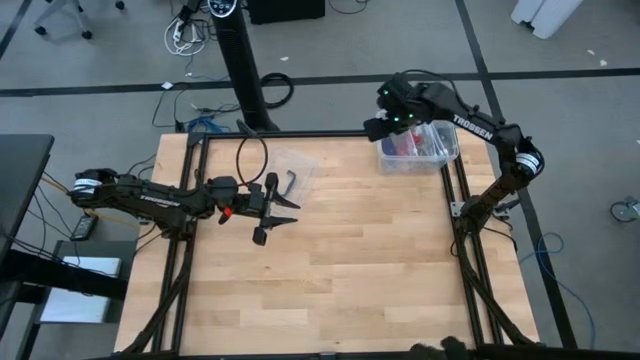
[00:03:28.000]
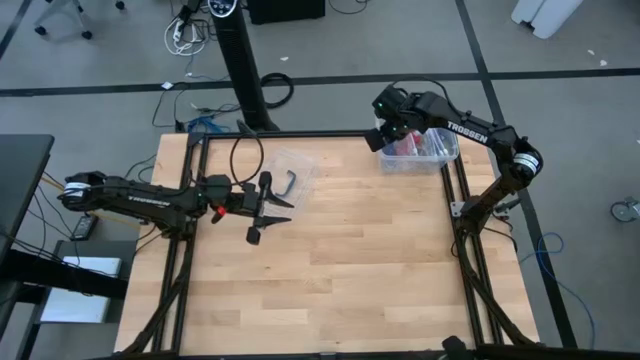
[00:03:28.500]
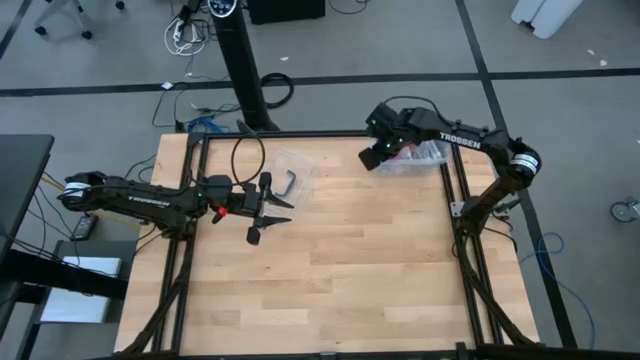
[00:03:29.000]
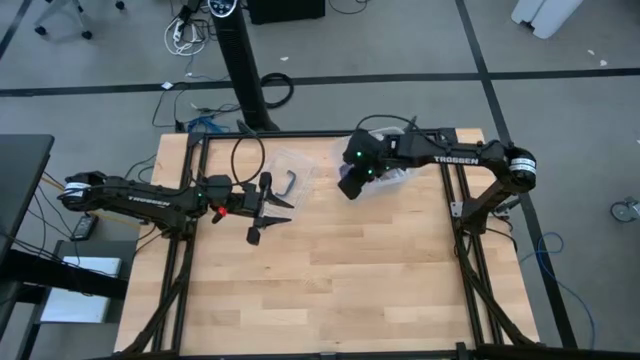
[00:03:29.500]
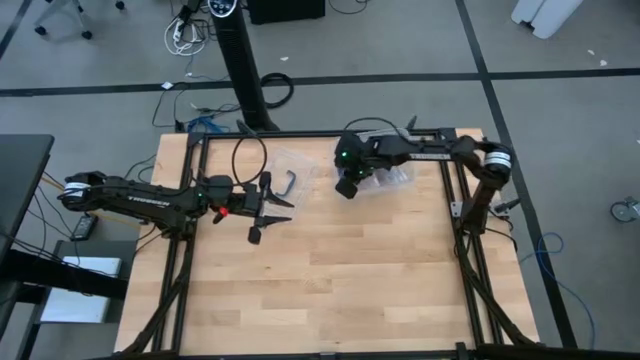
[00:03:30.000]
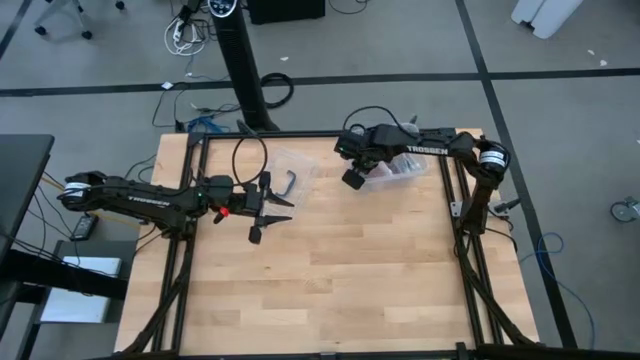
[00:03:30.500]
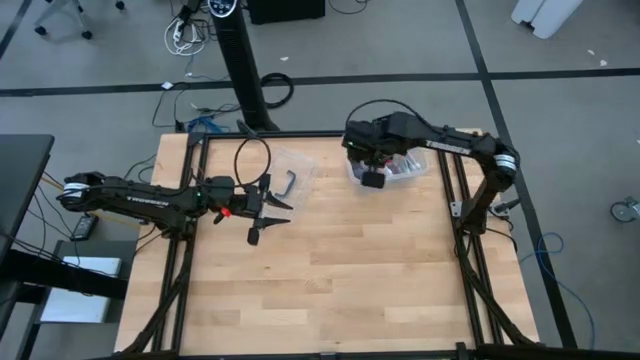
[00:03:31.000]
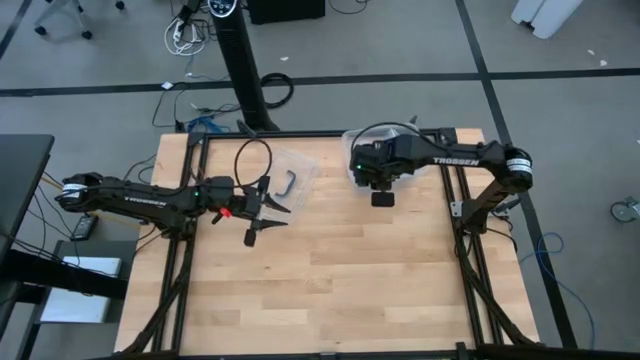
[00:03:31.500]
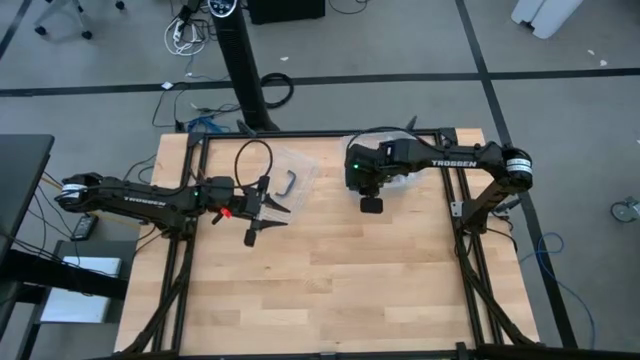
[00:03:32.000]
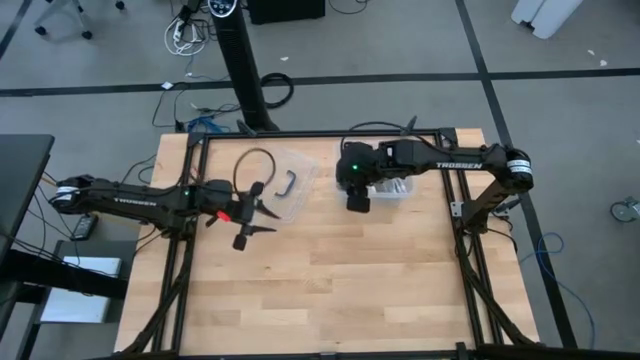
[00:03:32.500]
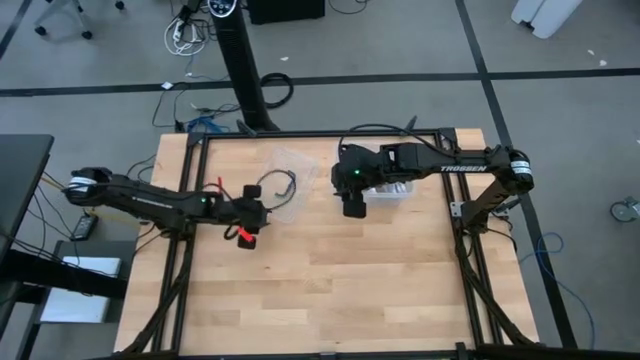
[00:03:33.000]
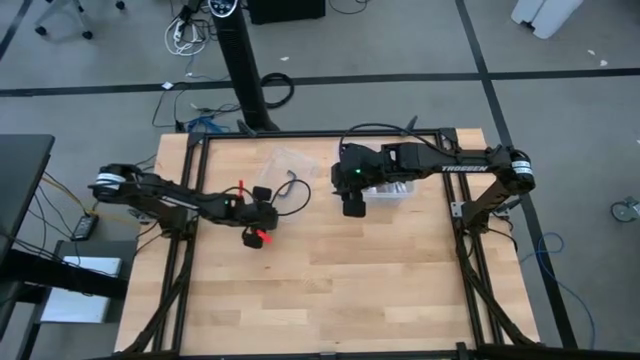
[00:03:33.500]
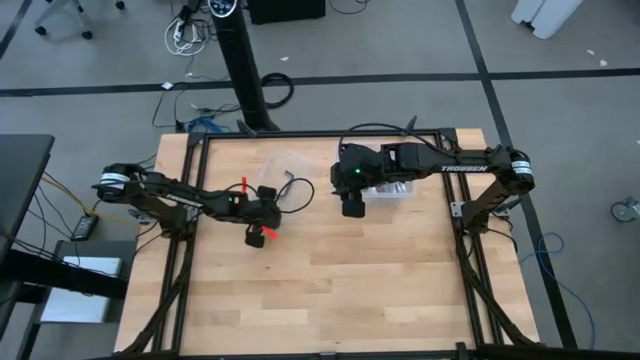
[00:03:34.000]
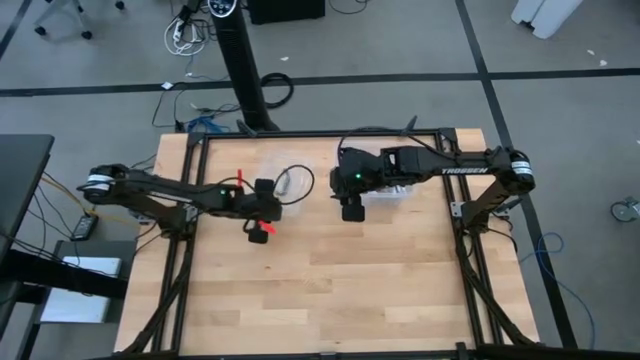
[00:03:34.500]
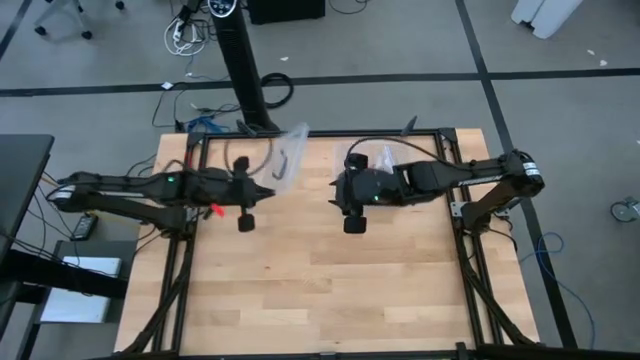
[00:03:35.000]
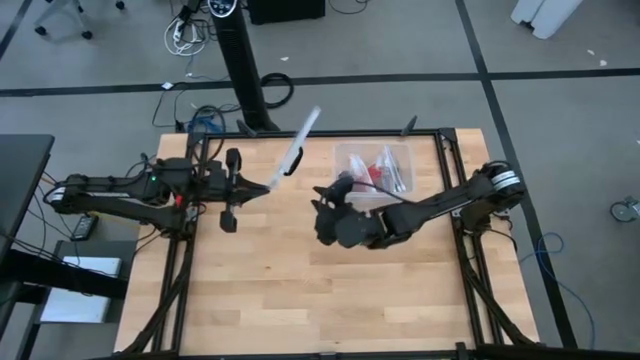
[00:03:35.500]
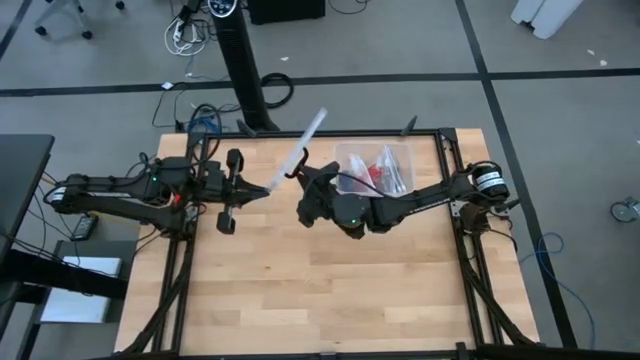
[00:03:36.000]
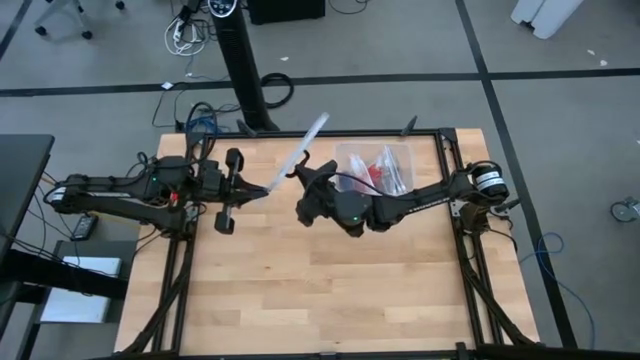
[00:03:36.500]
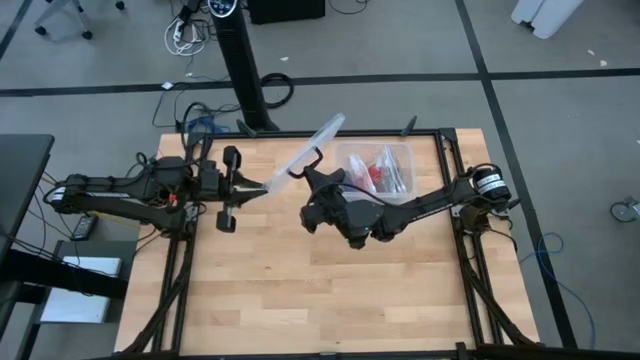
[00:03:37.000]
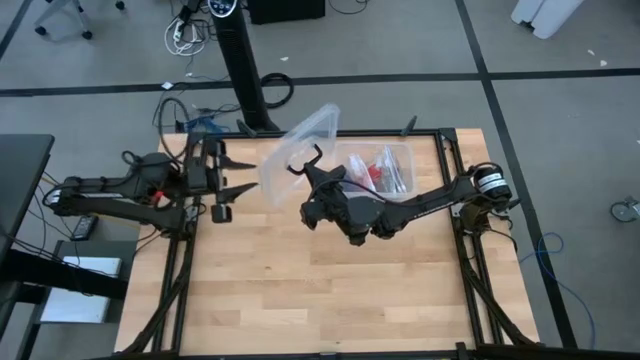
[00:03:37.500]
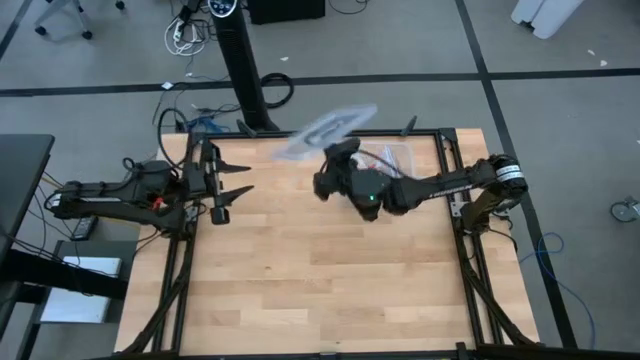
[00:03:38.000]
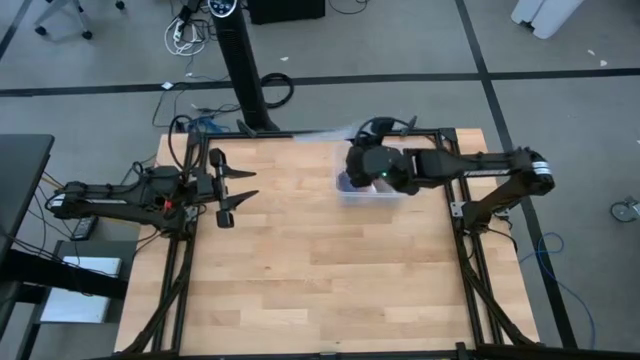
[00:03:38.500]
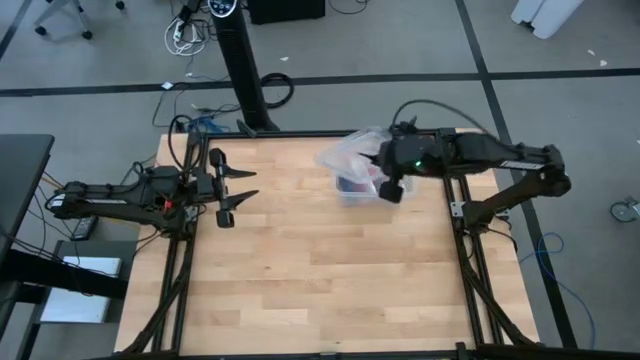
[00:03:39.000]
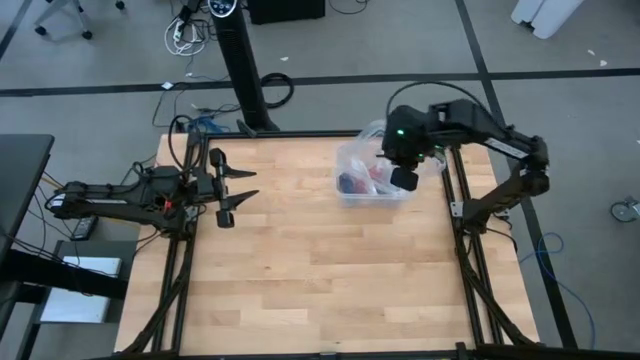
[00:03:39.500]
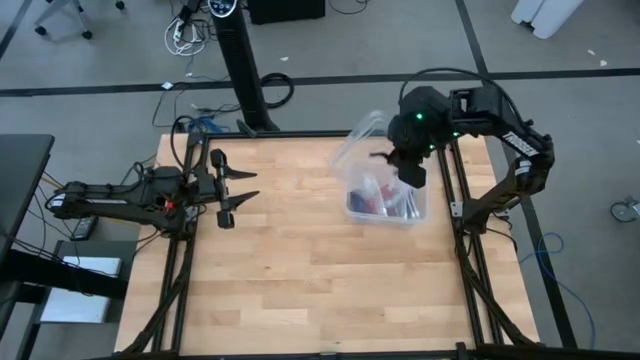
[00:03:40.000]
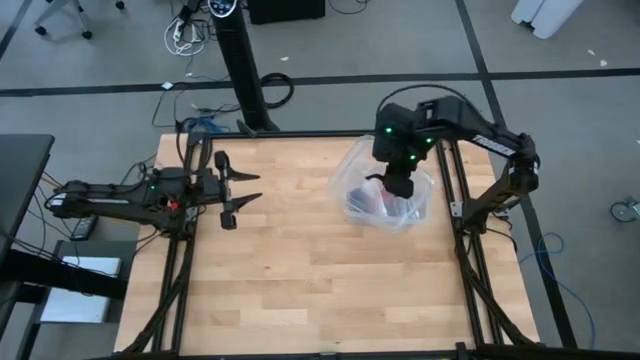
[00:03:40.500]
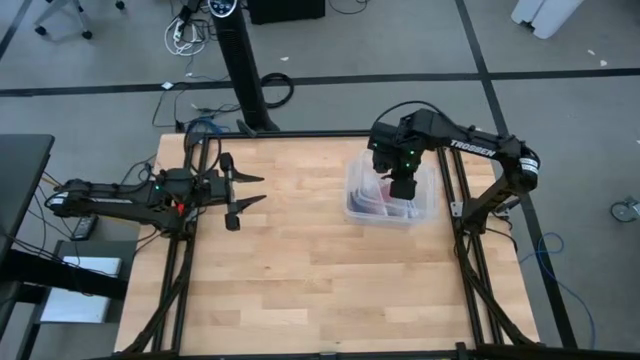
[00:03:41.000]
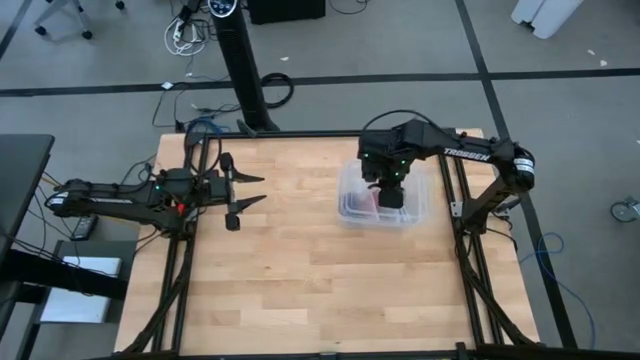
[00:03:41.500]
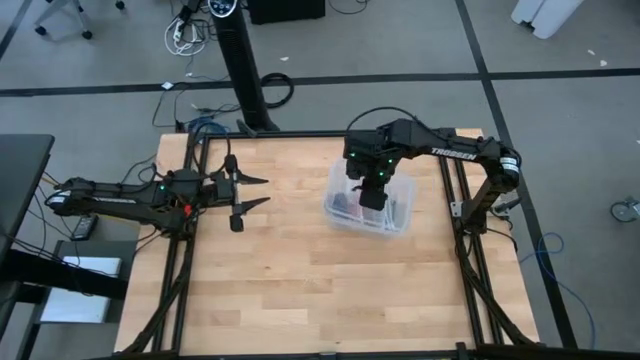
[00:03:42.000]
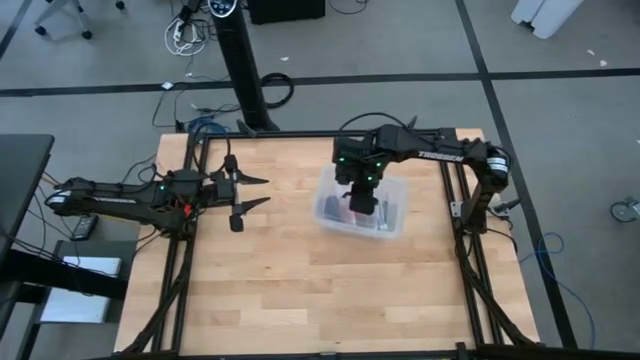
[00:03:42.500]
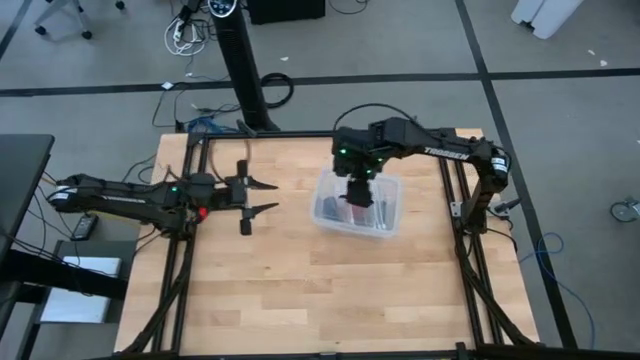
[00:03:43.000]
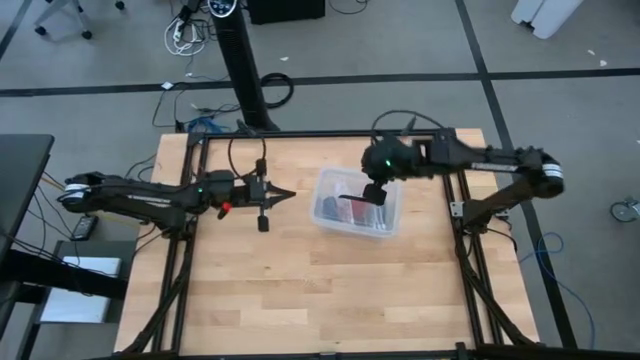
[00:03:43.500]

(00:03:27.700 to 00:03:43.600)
Task: Roll bandage
Close the lid of the transparent bin

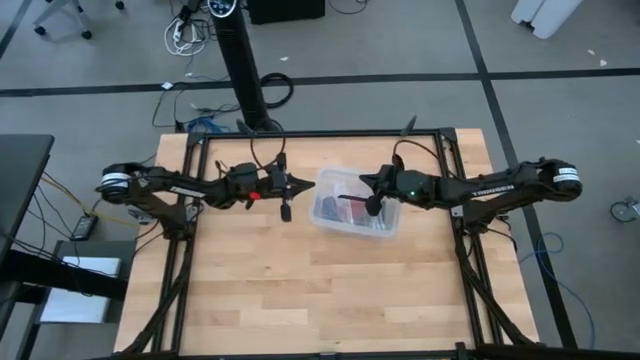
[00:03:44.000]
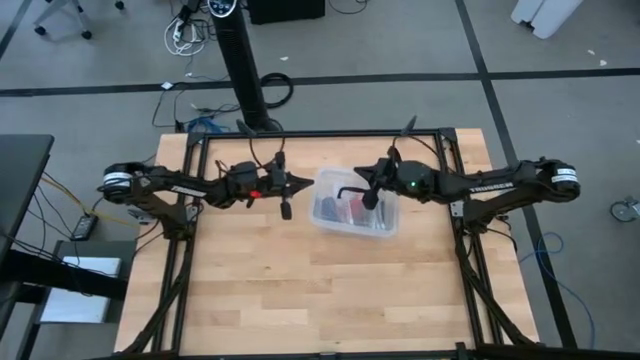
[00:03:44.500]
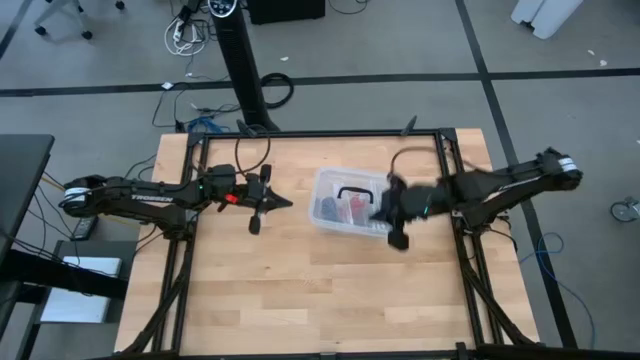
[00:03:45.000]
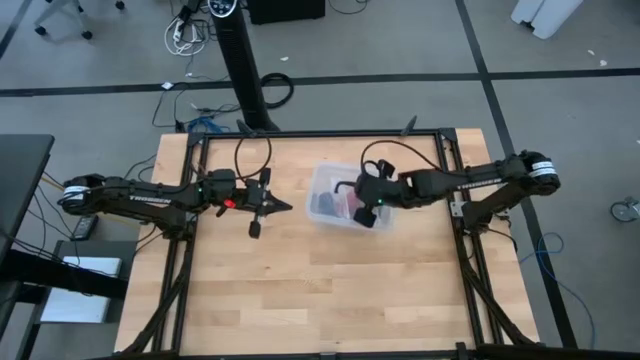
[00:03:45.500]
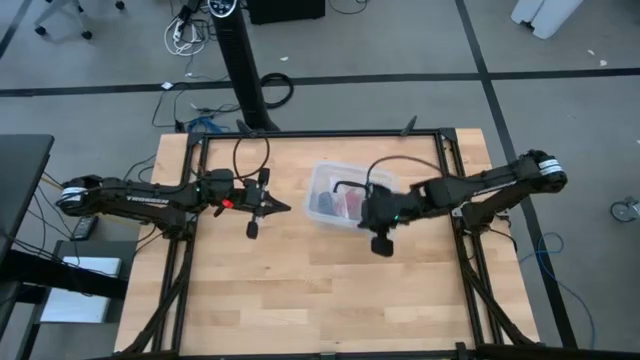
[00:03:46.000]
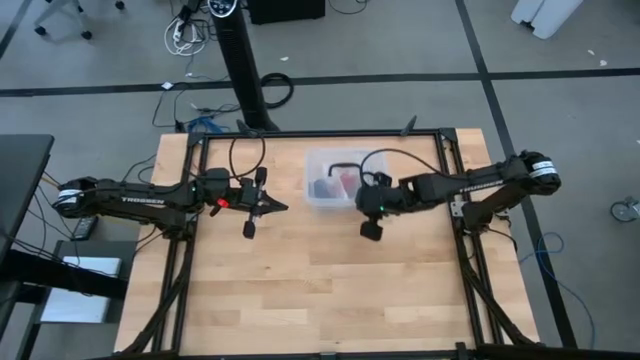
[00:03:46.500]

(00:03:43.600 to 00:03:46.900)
Move the transparent bin to the top of the table
